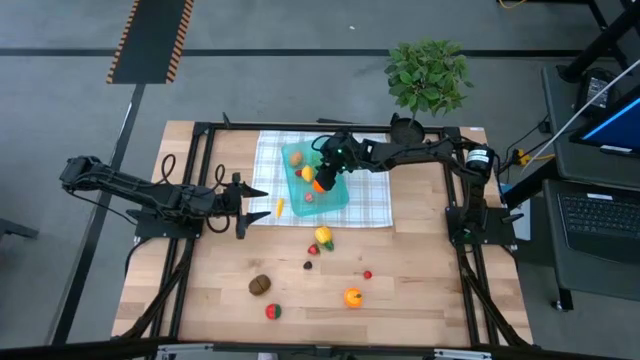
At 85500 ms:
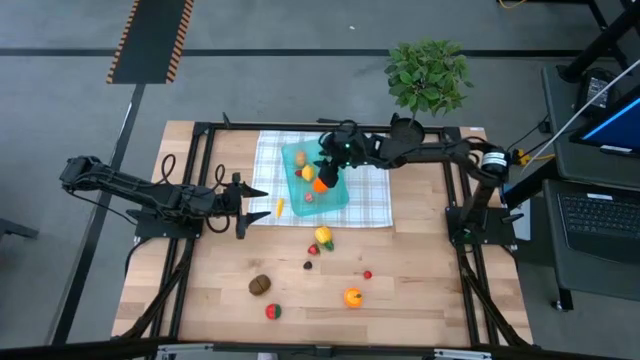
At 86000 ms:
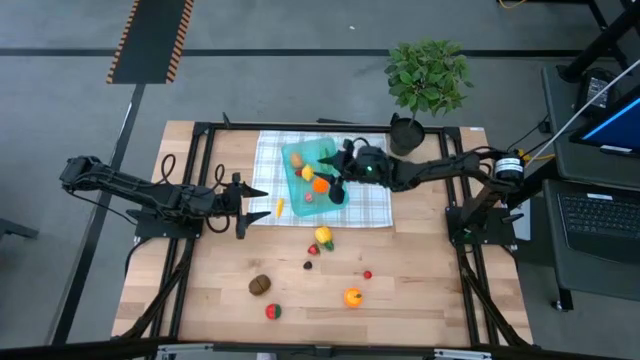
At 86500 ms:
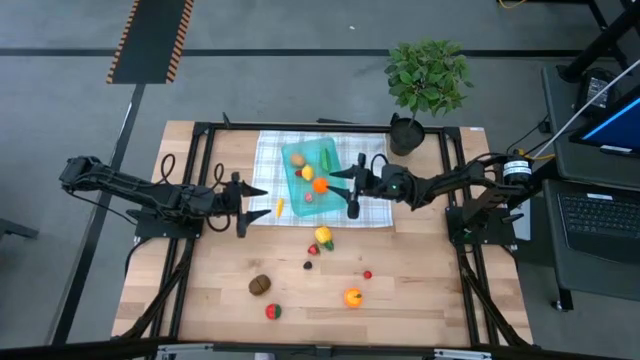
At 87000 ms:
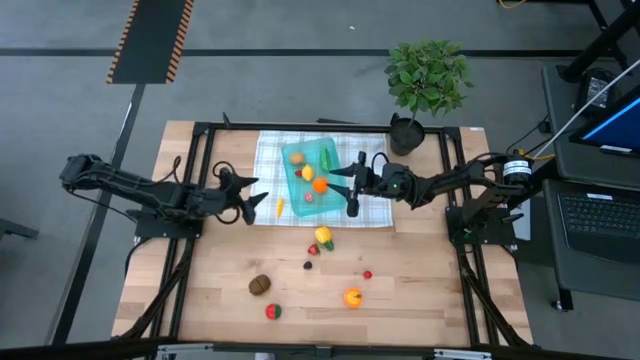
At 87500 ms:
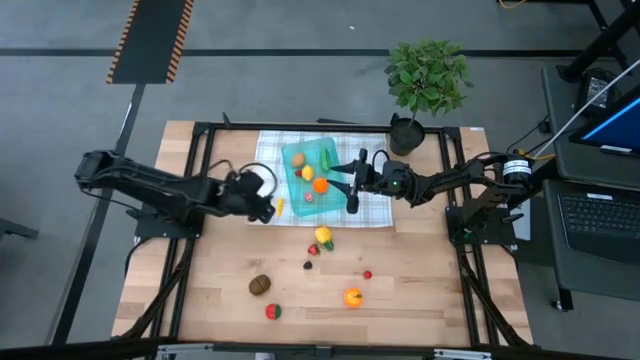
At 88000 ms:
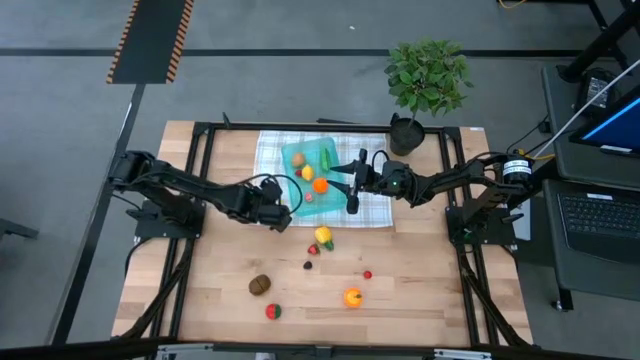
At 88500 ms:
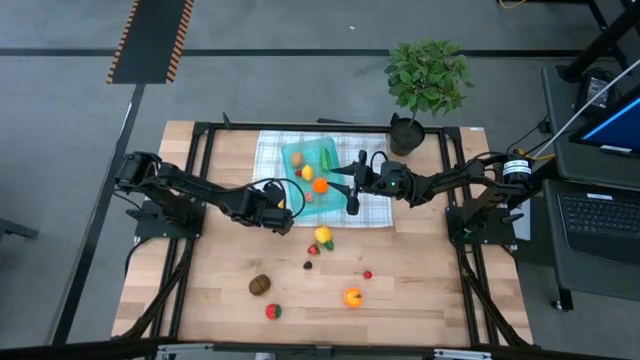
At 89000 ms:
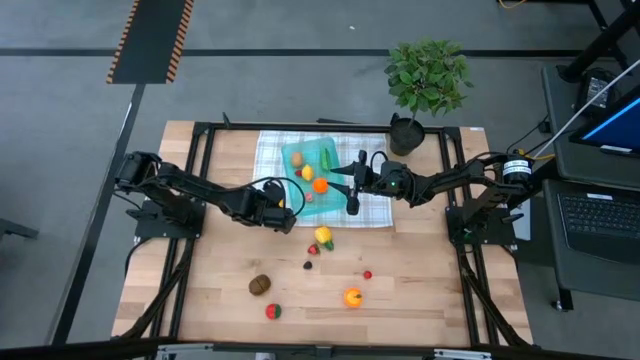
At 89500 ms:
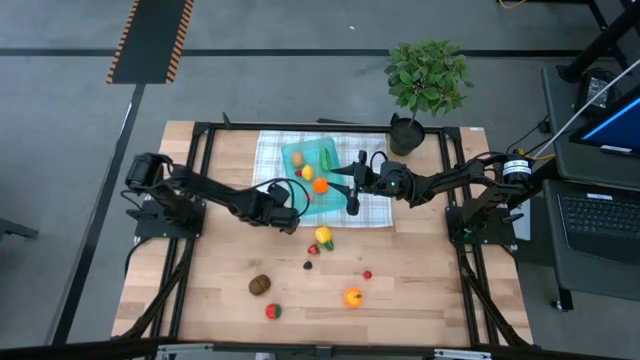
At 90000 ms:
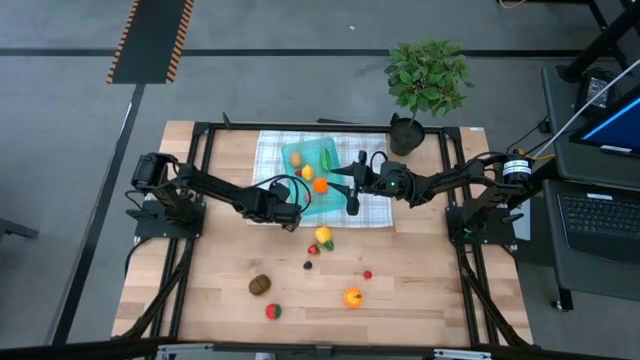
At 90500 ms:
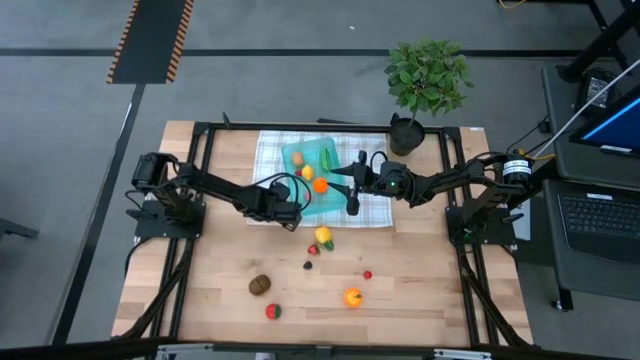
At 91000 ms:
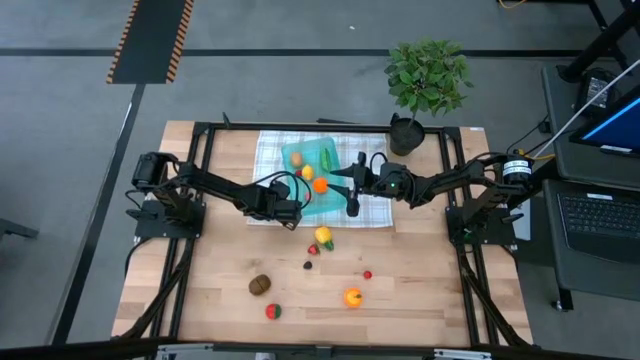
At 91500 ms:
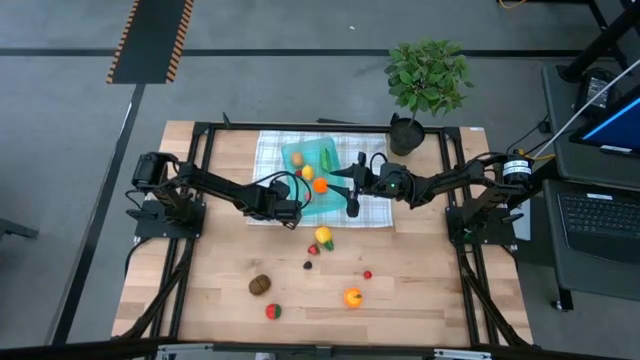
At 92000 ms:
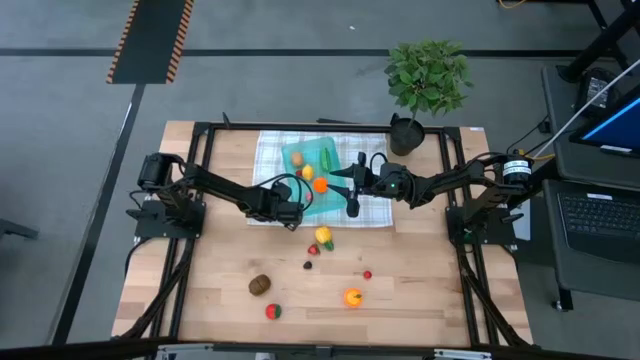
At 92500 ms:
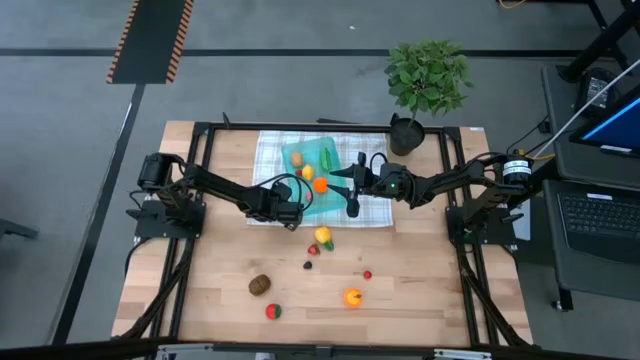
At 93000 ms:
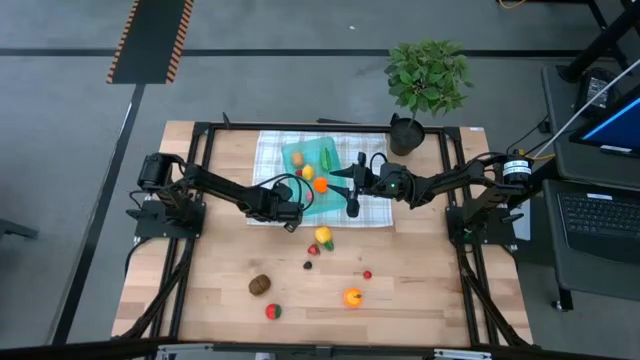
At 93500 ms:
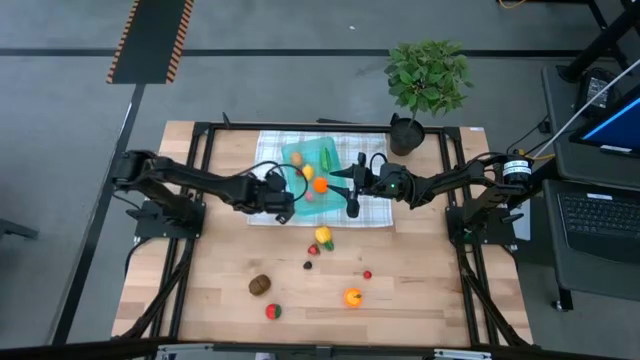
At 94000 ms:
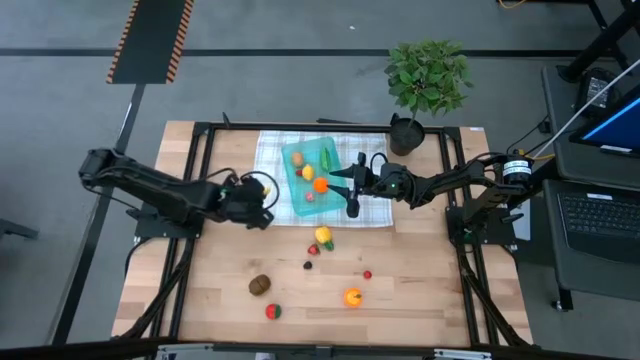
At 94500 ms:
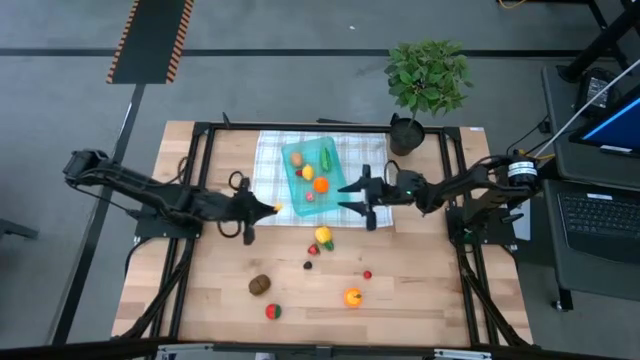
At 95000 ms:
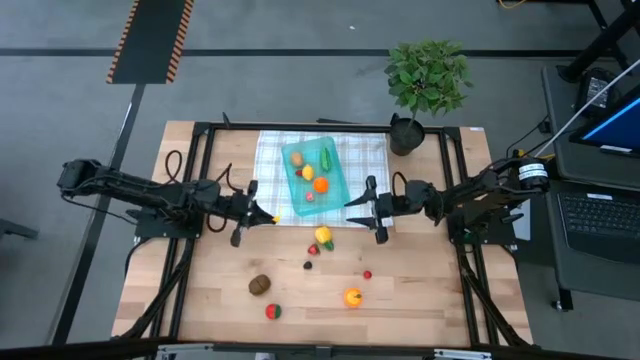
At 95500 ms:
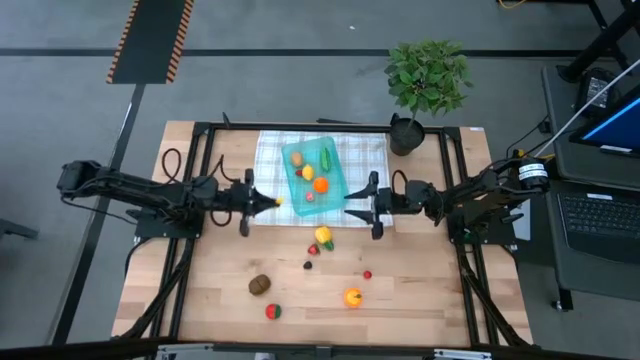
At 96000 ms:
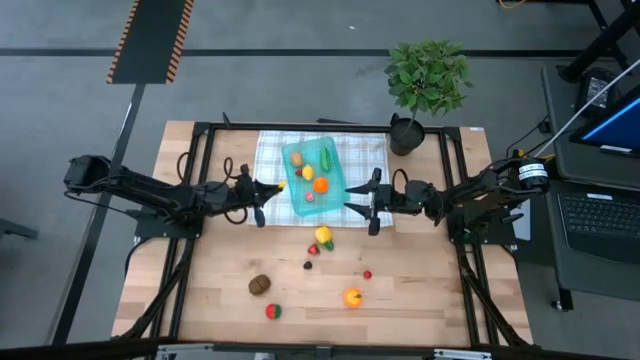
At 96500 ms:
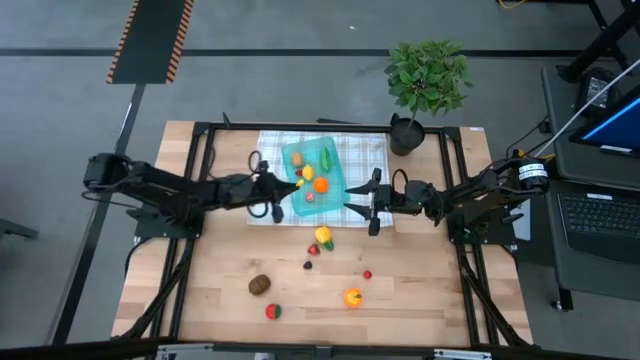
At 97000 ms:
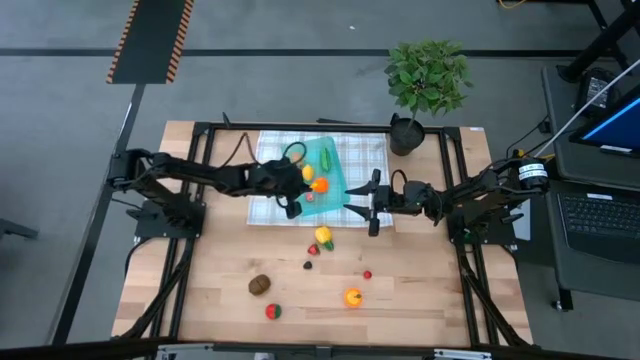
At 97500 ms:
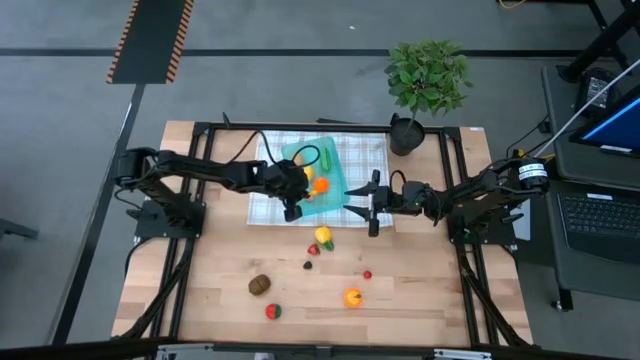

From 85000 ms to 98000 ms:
Task: Pick and placing Produce into tupperware
Put the yellow corn into the blue bin
